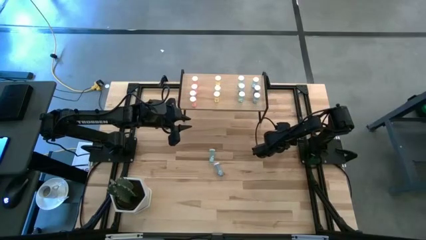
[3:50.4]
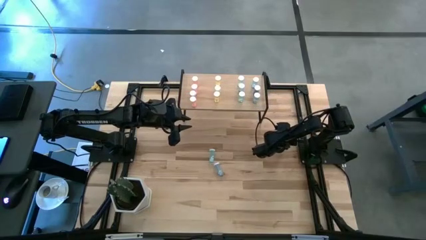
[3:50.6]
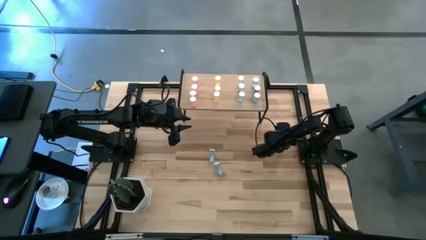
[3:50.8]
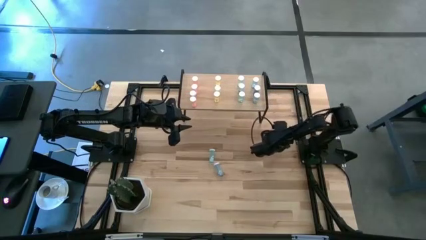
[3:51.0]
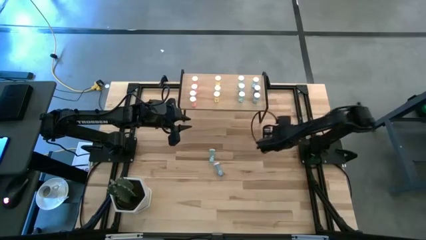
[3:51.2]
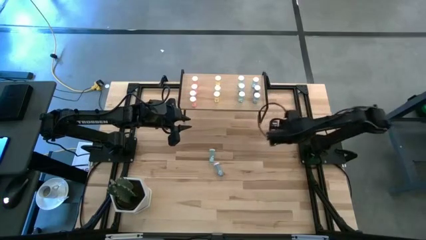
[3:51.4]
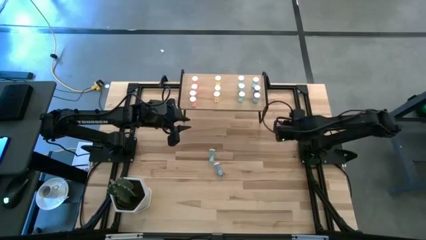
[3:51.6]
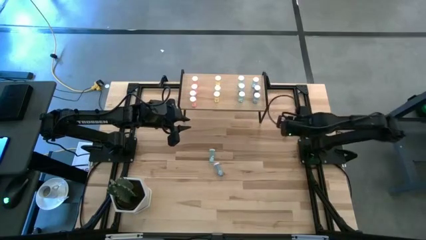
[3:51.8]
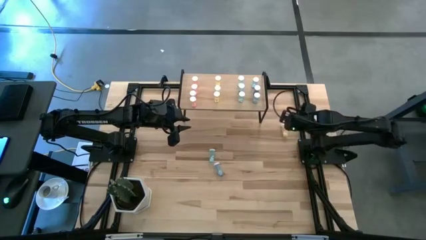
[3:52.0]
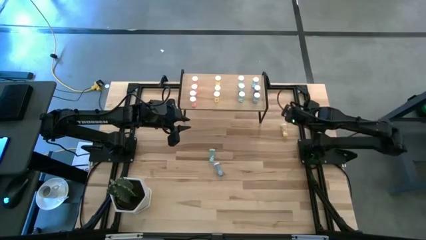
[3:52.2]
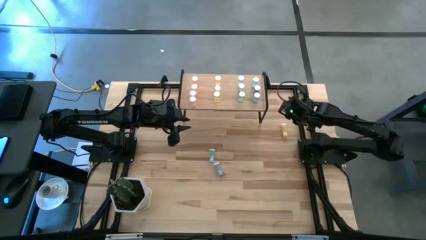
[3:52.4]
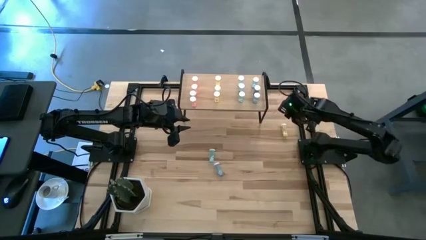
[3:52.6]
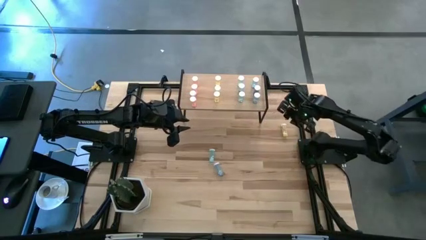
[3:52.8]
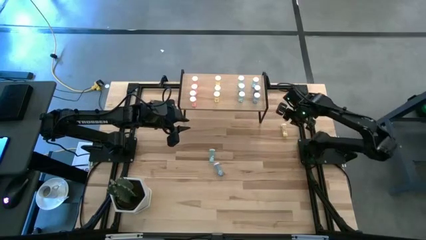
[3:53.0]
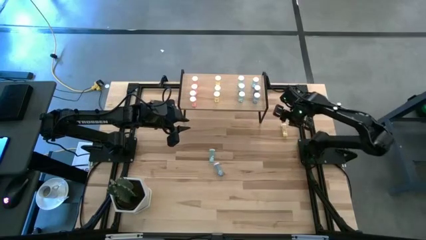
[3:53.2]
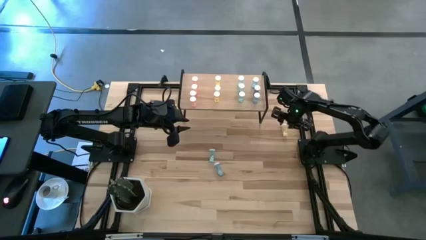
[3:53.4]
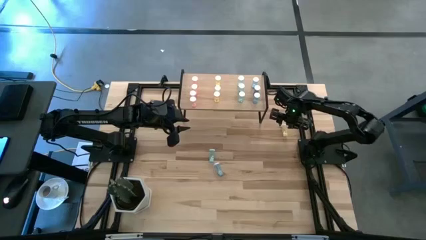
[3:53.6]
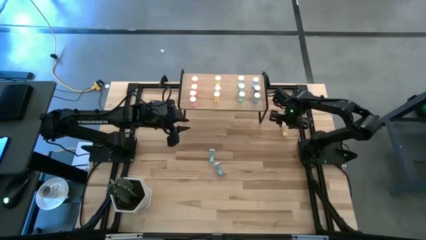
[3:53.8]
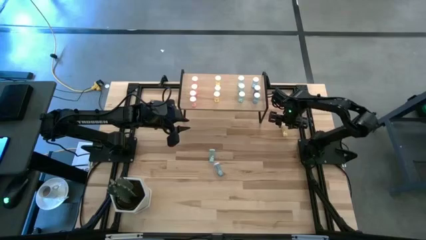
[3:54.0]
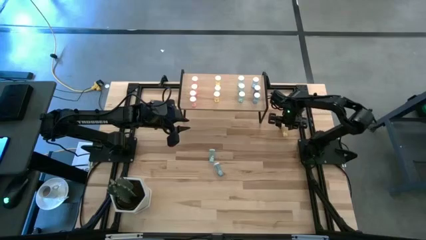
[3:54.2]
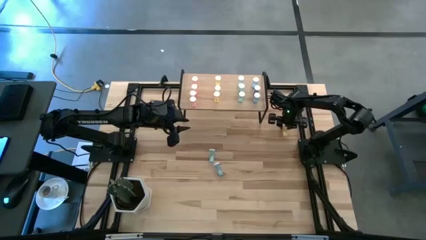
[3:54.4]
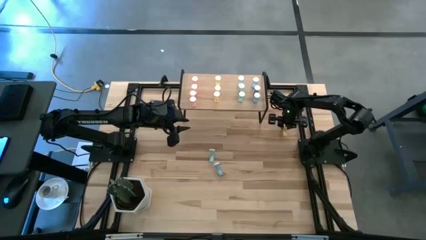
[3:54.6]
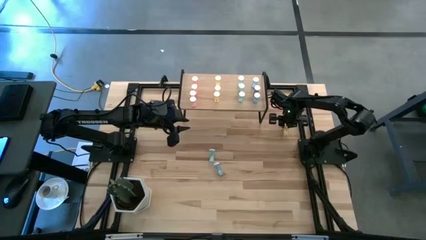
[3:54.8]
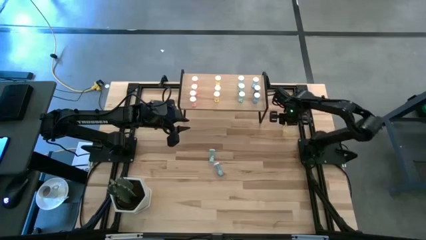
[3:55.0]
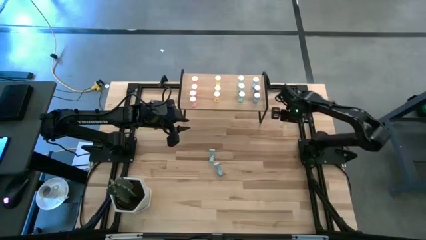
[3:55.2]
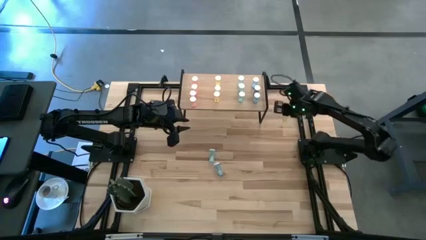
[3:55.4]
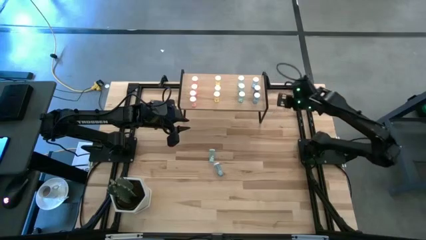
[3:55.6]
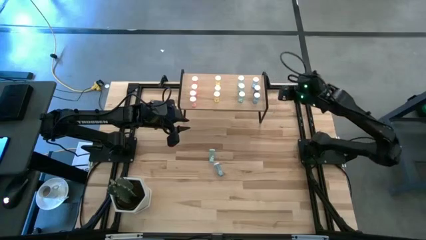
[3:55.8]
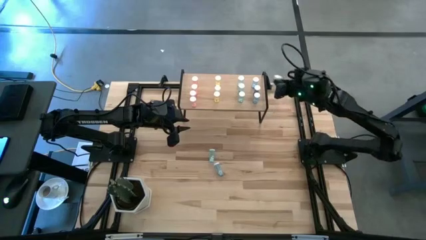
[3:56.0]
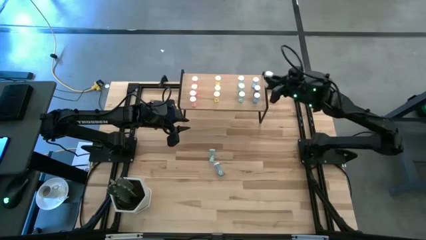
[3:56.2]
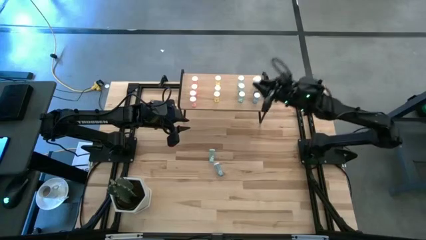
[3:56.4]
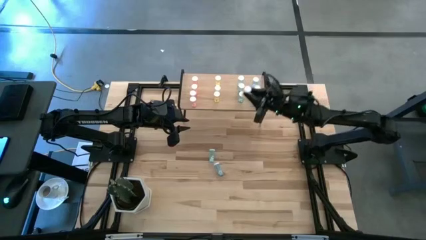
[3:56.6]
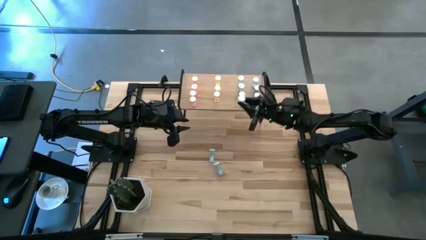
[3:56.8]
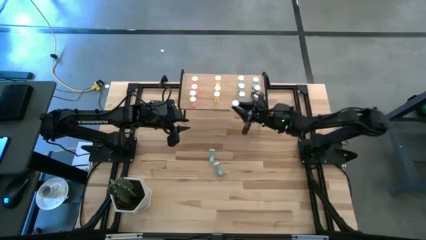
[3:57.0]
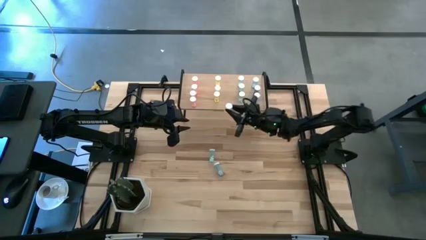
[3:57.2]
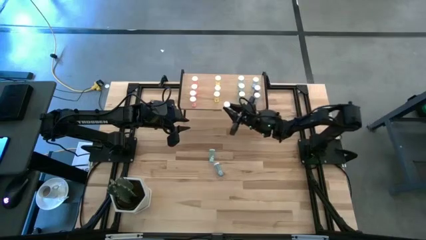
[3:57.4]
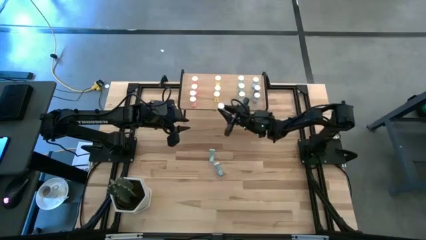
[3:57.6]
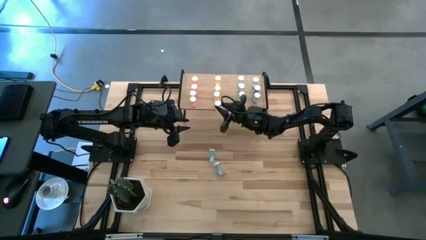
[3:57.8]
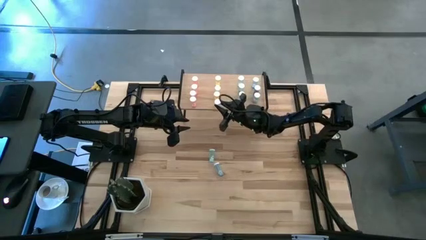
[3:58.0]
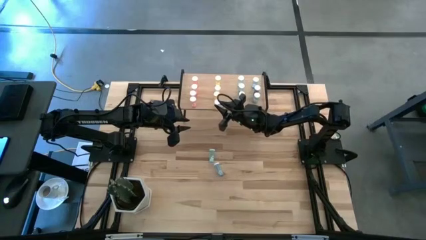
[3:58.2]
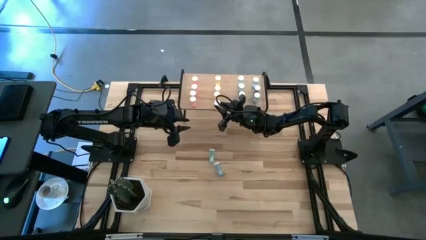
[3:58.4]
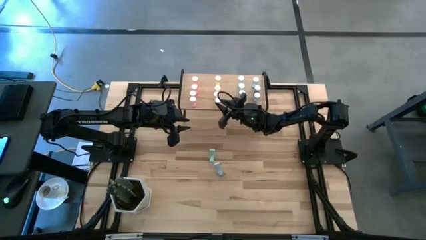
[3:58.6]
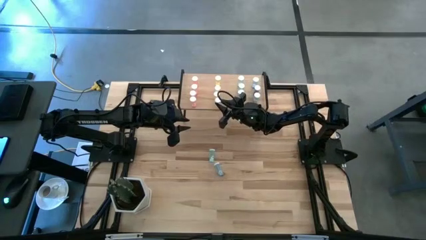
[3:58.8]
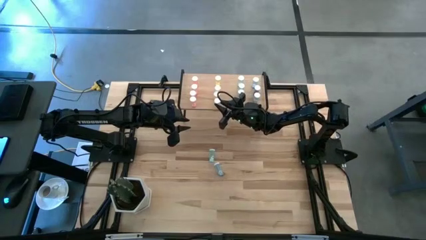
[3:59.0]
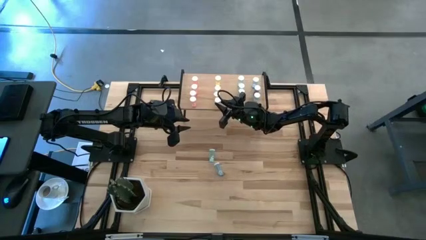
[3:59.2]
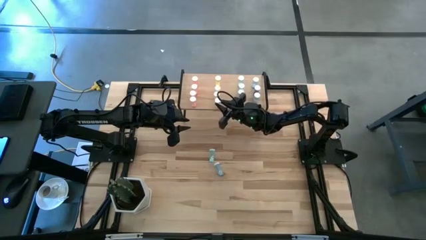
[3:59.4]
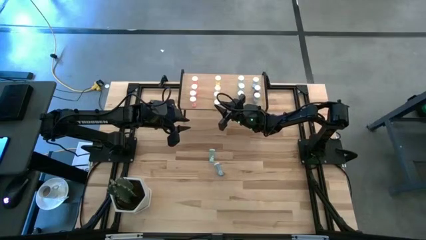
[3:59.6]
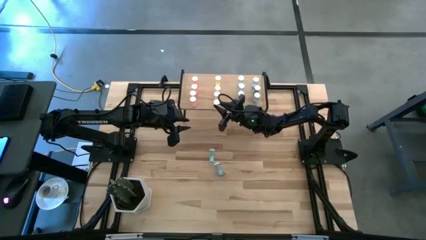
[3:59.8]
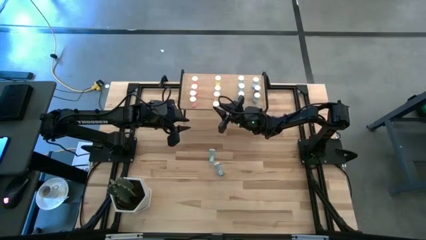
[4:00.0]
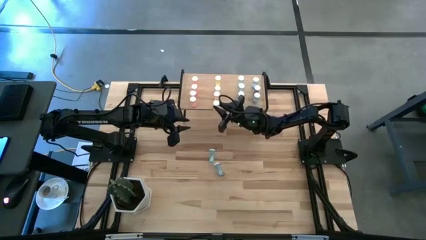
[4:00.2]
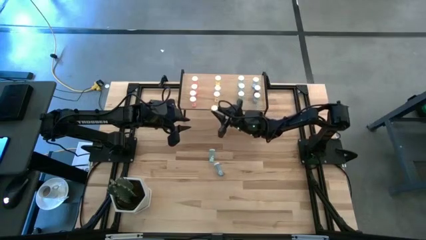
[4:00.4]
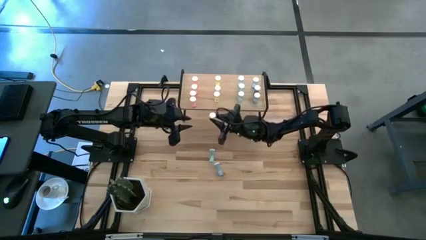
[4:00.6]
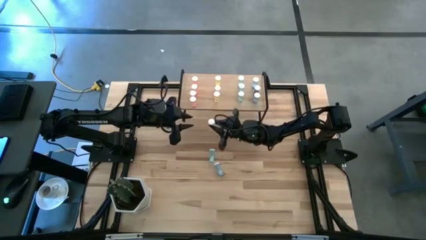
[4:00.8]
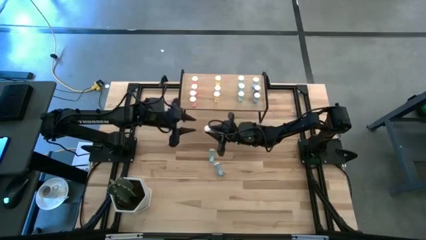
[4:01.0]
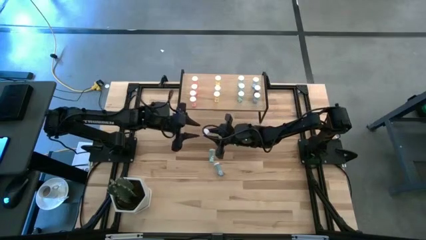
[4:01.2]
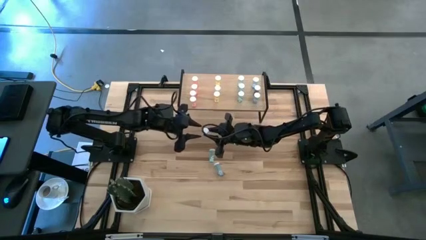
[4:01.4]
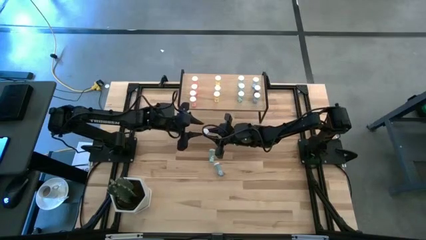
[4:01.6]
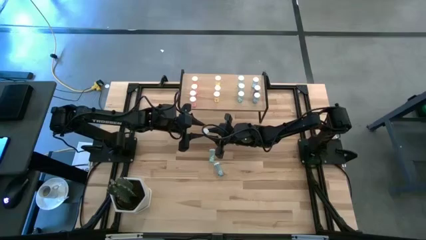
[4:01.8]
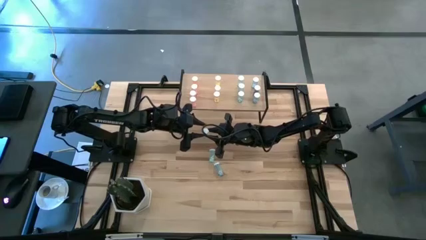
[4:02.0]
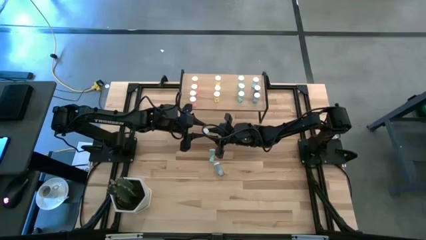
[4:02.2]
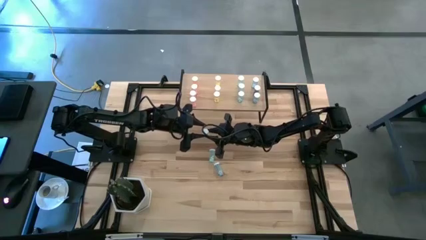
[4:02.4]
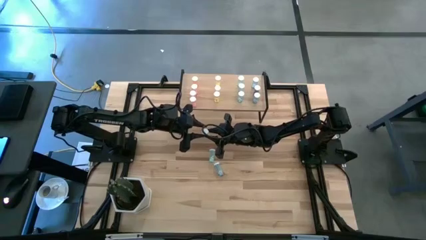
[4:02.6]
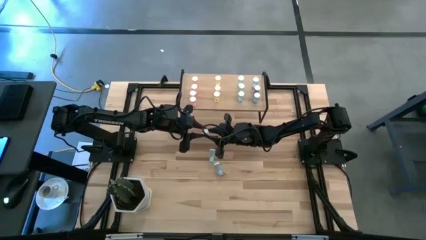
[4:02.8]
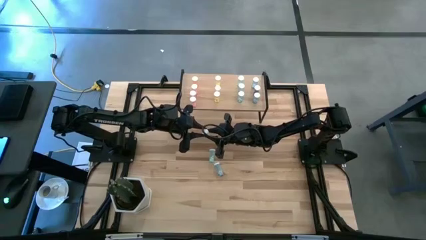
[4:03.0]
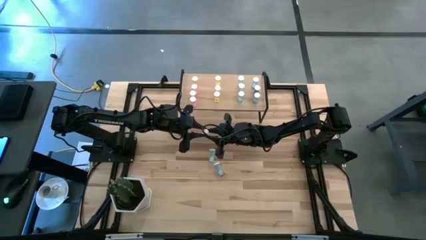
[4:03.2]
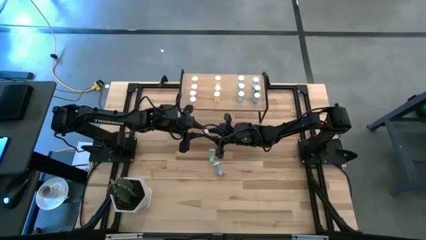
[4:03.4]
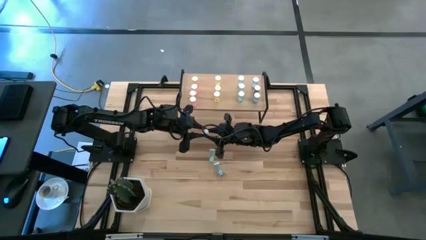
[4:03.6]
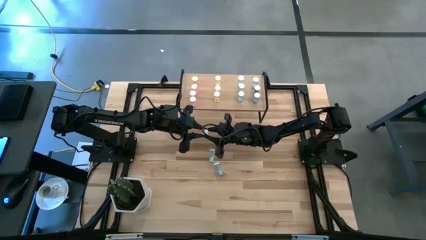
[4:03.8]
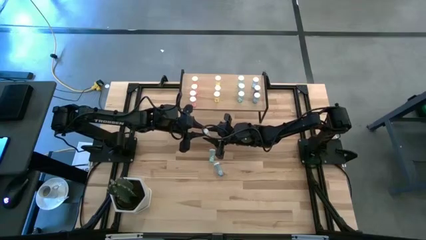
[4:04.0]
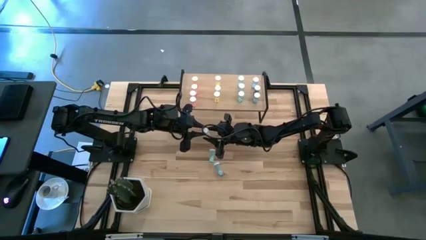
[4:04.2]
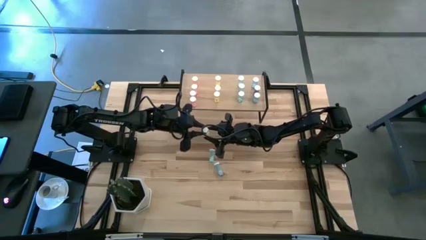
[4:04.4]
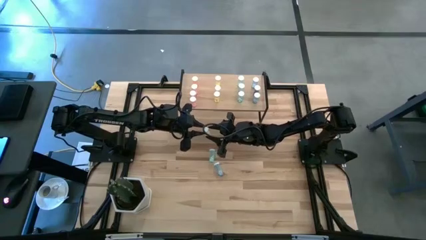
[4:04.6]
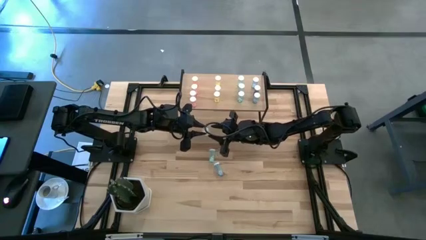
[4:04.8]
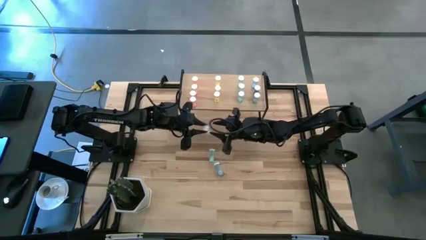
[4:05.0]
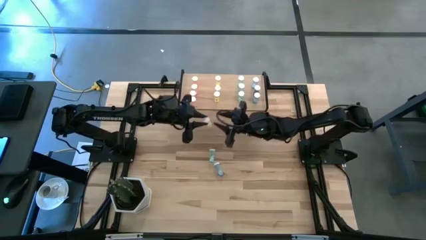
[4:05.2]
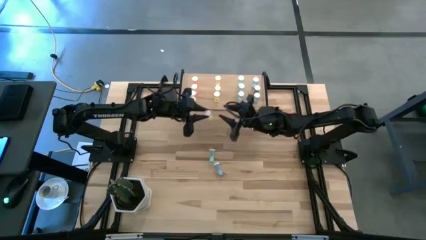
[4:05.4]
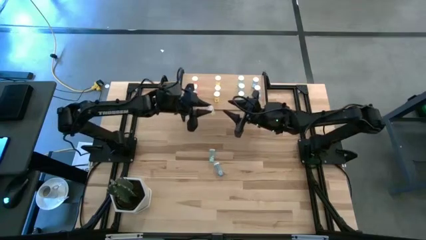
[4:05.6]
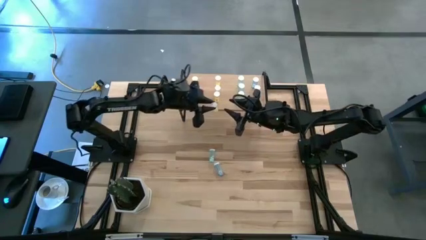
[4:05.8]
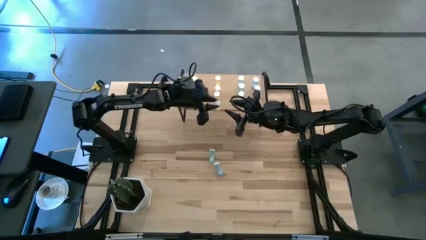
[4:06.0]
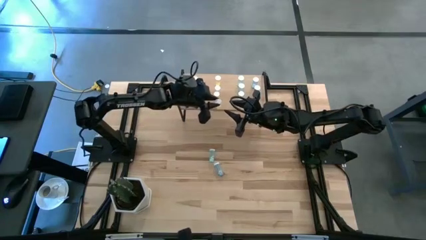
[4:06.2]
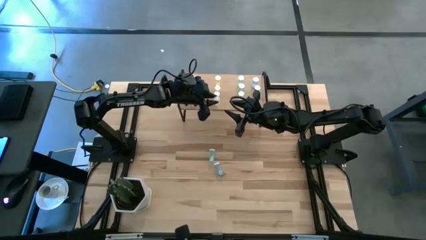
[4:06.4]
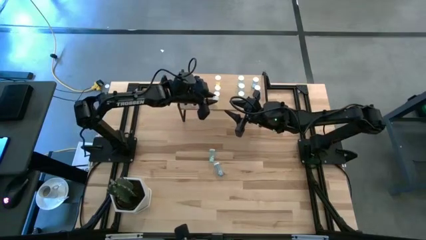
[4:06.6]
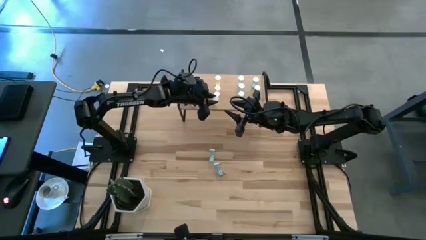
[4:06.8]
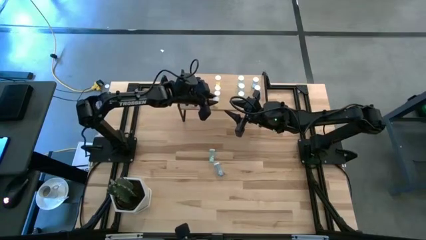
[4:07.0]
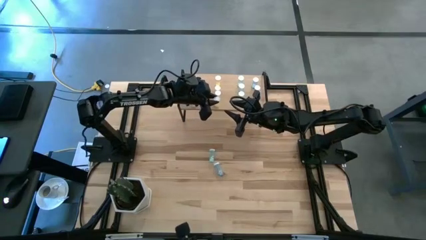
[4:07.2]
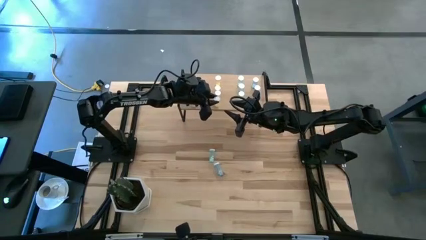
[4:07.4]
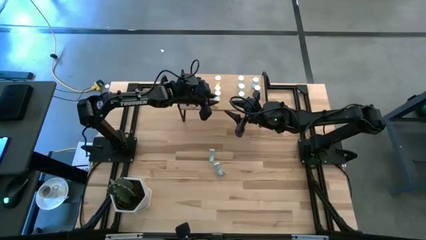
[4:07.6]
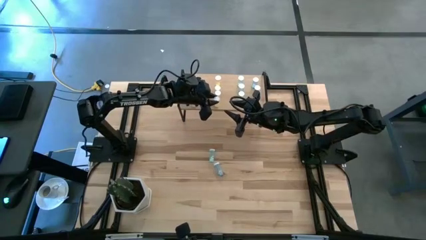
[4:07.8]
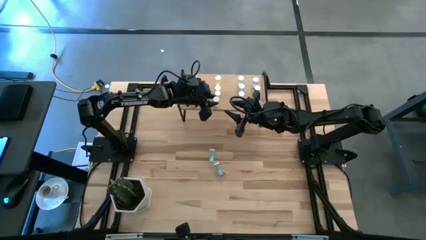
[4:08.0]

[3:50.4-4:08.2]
Task: Pick and place medicine bottles onto shelf by color
Put the yellow pill bottle on the shelf aligned with the other yellow pill bottles
